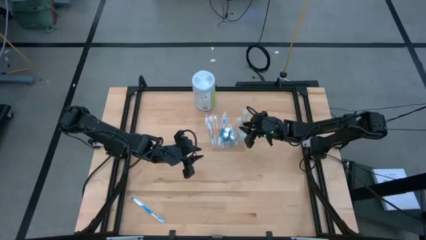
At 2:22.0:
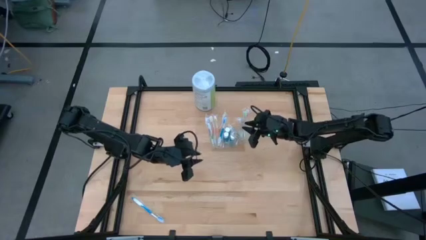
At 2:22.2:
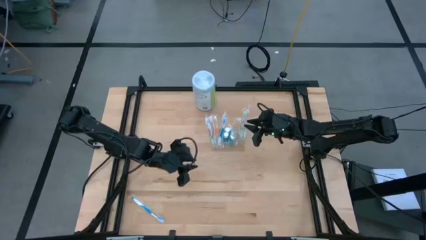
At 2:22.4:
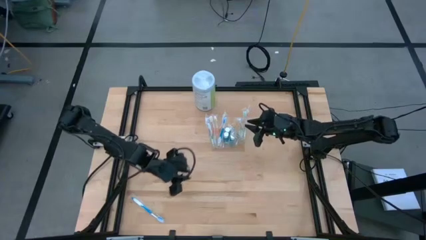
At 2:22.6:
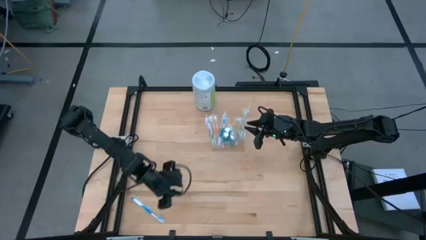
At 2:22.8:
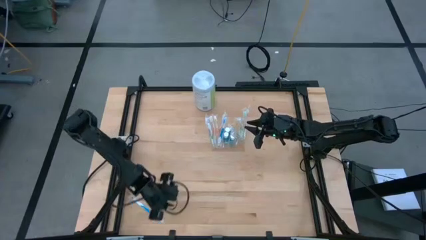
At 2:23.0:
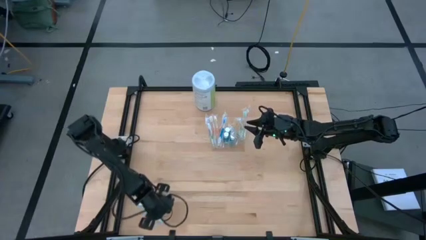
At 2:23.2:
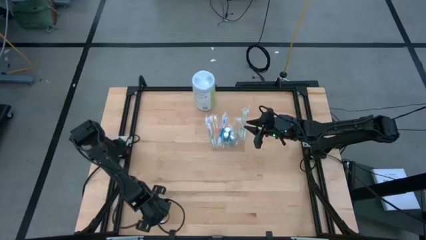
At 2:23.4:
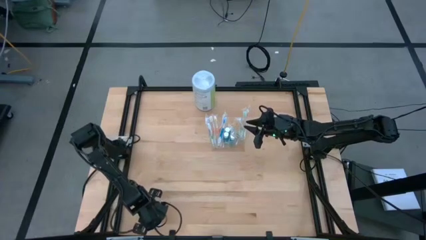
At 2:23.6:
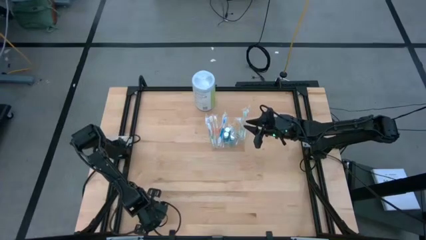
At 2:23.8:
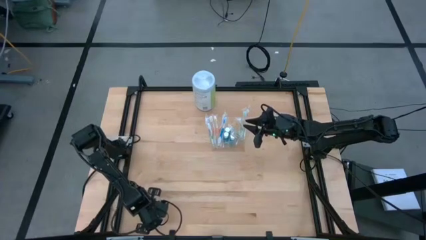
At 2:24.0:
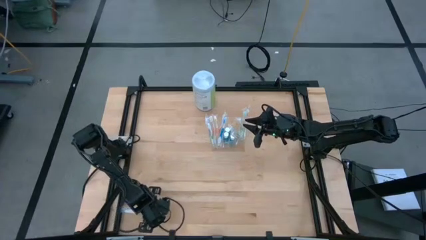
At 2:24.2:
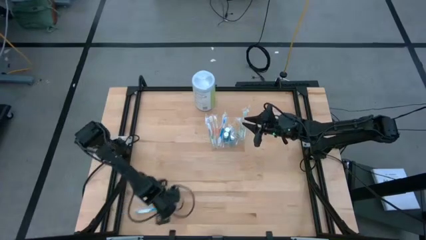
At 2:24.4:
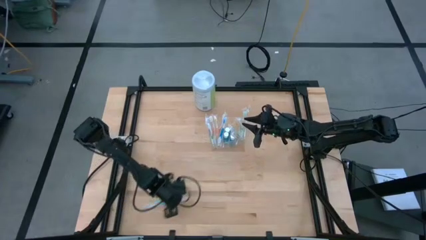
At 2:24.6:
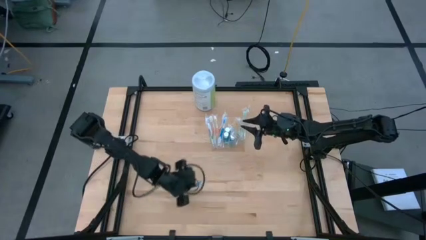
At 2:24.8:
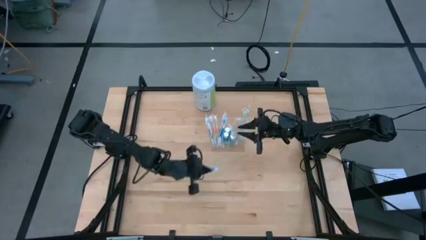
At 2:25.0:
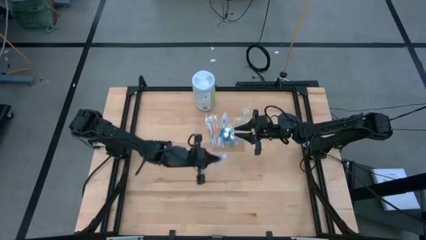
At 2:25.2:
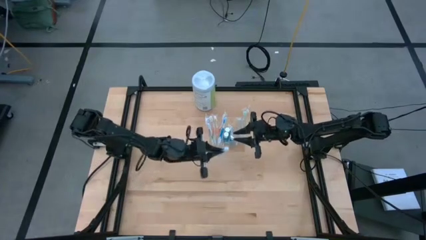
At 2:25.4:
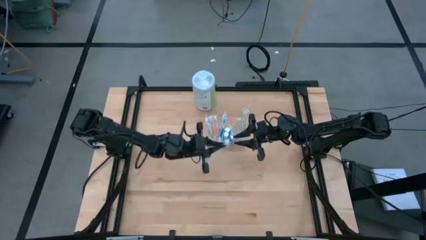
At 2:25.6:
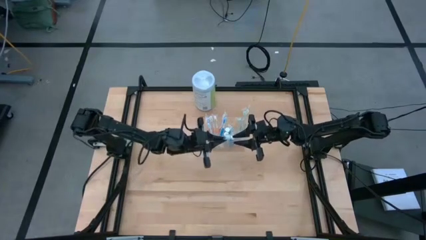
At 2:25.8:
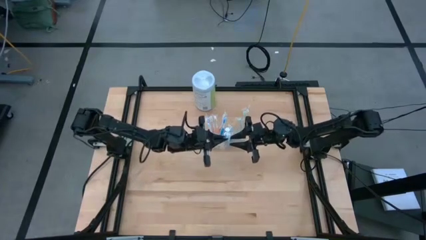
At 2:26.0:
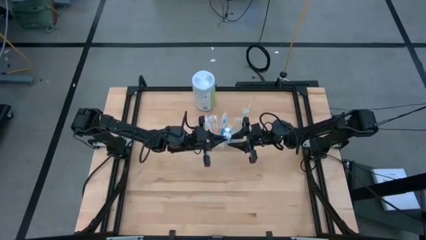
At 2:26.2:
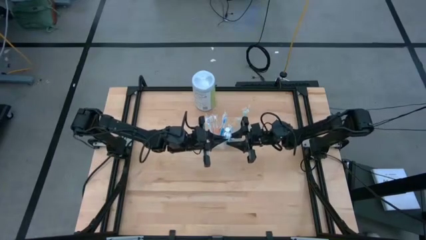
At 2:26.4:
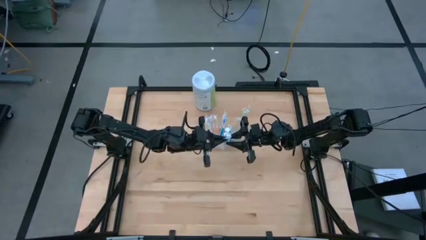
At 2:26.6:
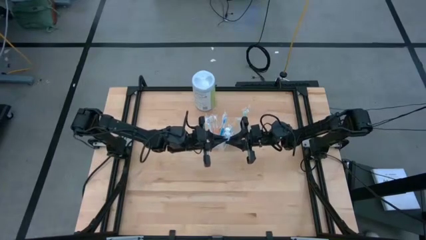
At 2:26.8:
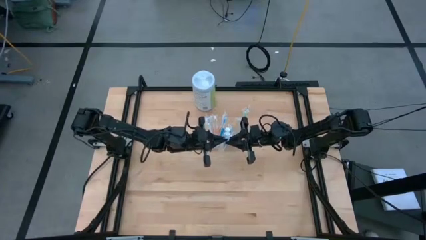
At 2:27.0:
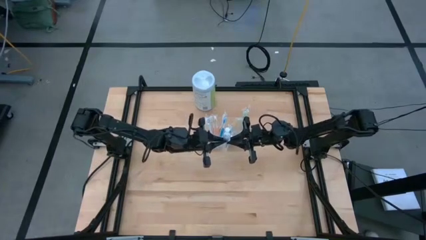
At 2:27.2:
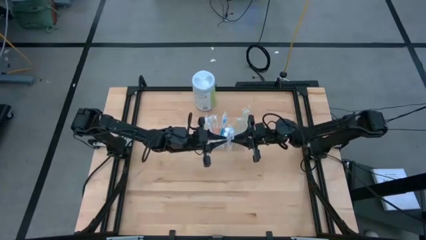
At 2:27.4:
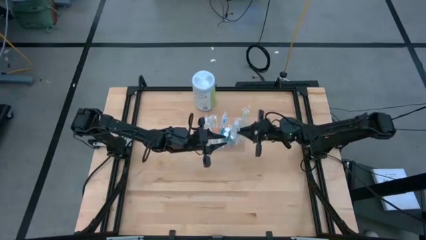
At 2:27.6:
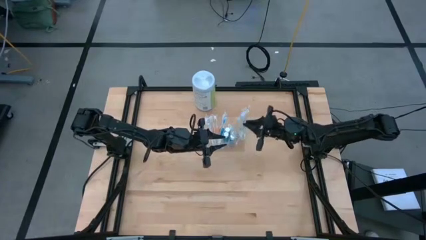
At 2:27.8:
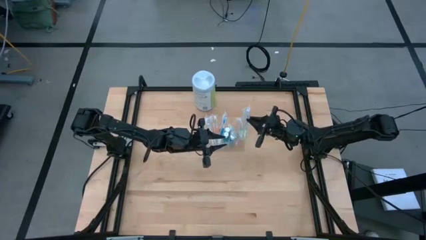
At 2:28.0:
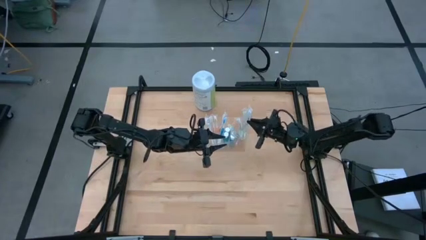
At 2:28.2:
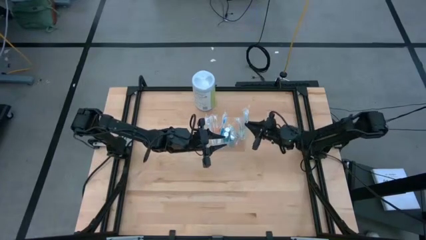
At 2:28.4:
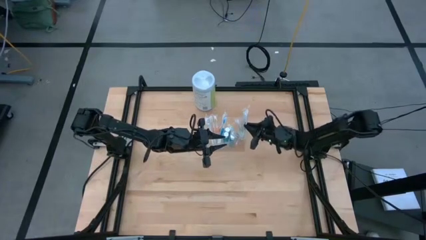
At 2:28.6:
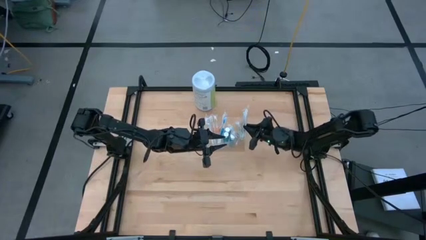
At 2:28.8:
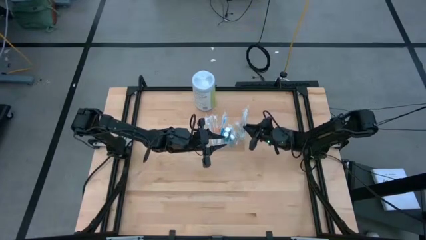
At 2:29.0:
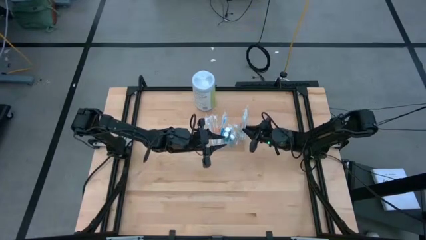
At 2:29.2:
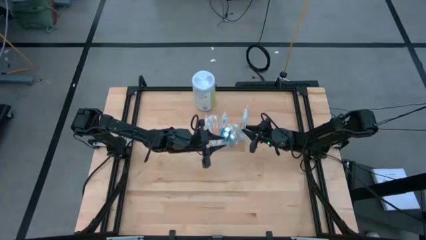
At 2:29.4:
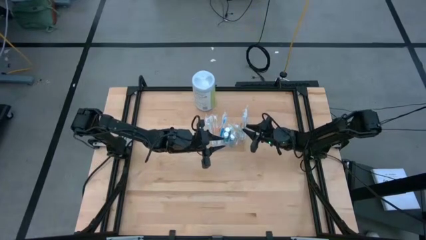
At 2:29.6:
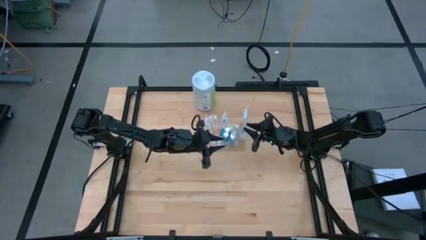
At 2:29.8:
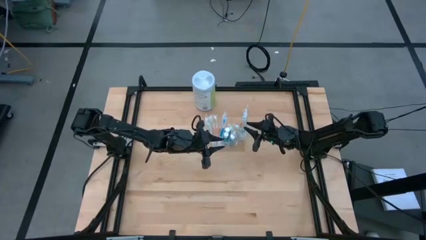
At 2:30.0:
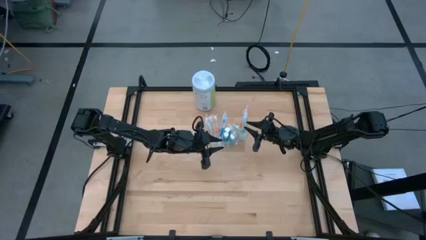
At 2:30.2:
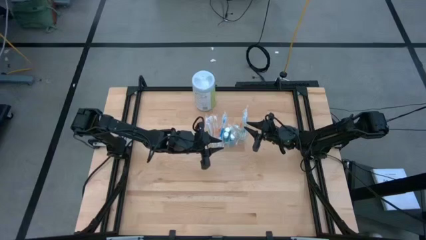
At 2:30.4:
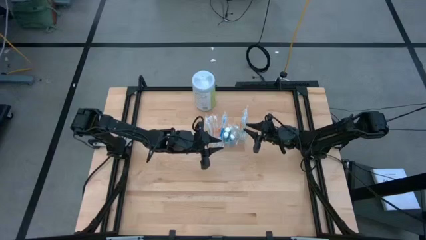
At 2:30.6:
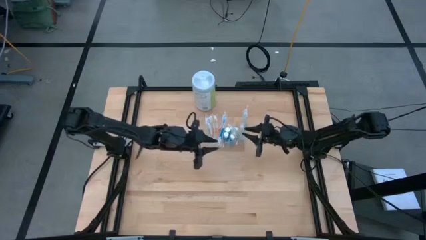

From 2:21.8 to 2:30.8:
Task: Pick & Place toothbrushing station
Put the blue toothbrush into the transparent organizer

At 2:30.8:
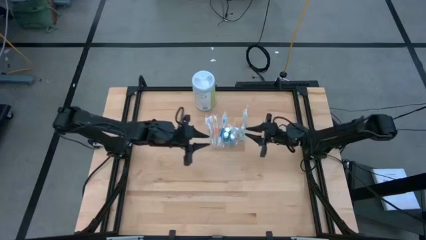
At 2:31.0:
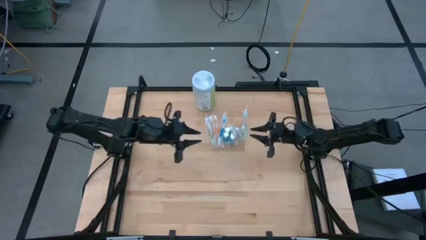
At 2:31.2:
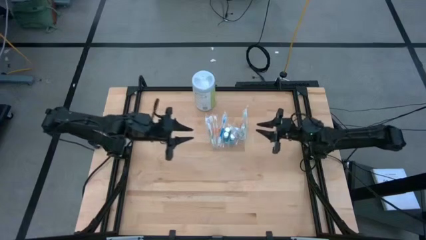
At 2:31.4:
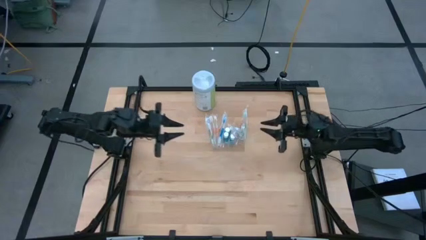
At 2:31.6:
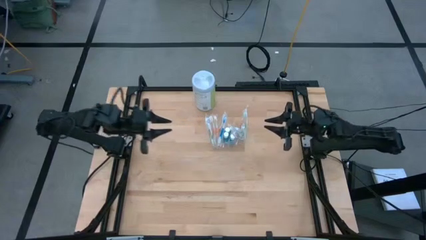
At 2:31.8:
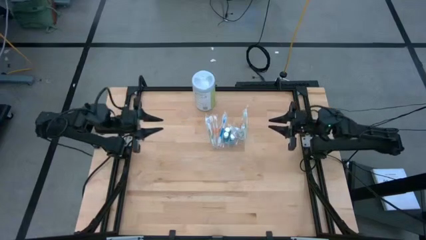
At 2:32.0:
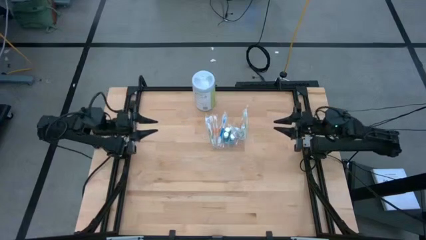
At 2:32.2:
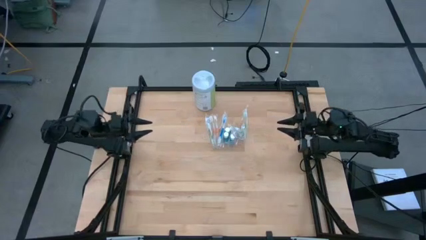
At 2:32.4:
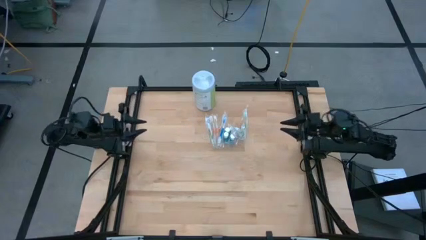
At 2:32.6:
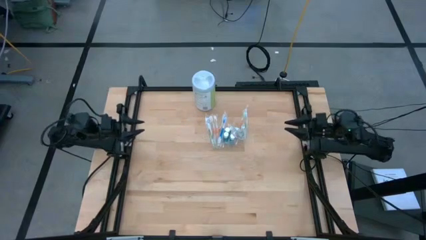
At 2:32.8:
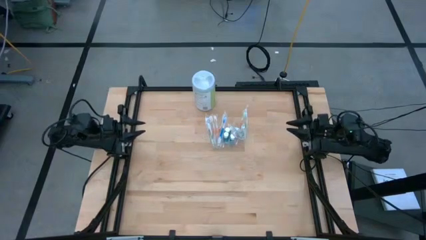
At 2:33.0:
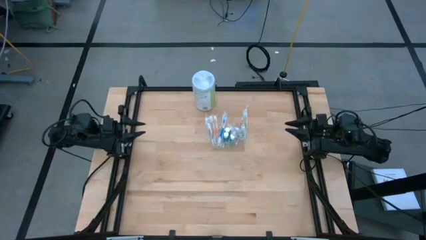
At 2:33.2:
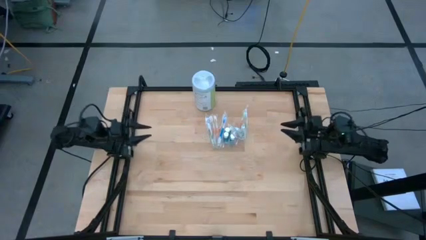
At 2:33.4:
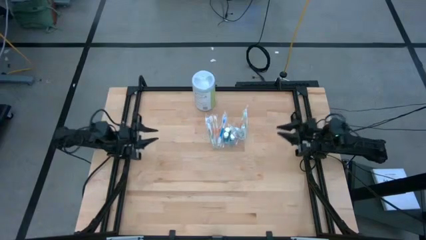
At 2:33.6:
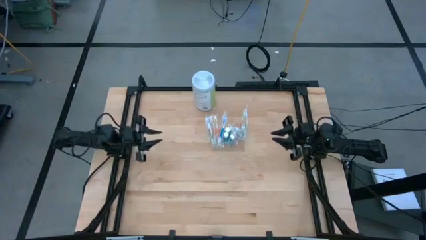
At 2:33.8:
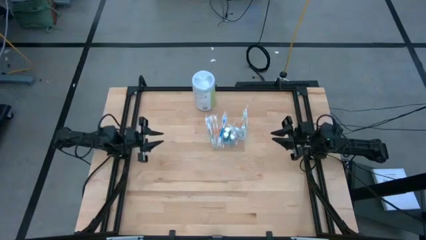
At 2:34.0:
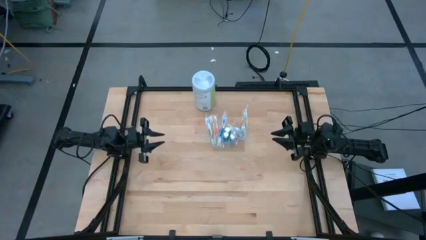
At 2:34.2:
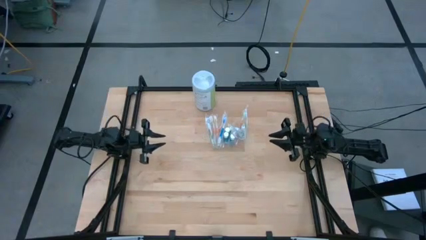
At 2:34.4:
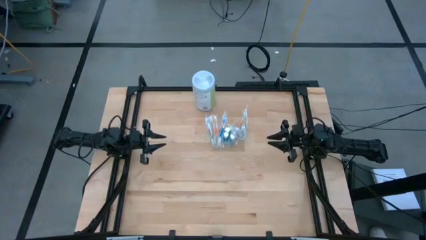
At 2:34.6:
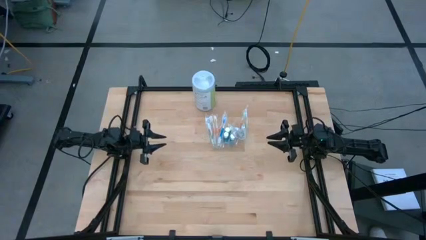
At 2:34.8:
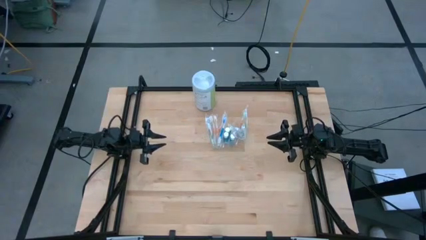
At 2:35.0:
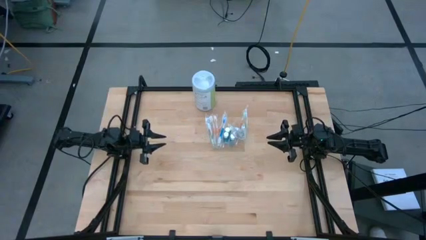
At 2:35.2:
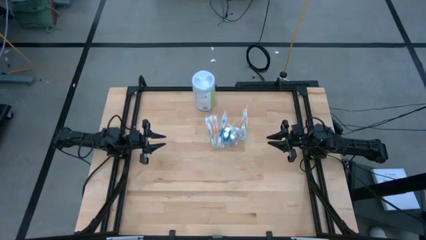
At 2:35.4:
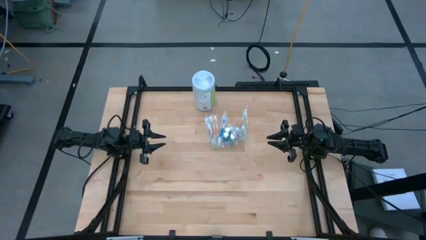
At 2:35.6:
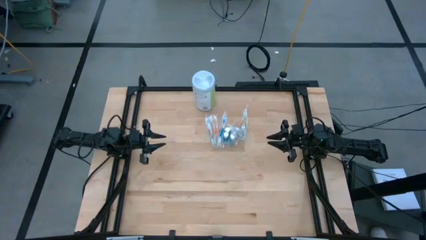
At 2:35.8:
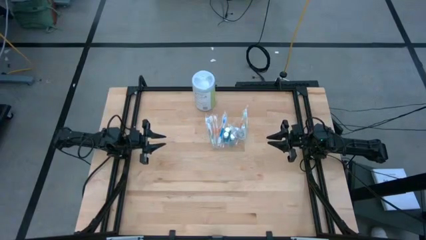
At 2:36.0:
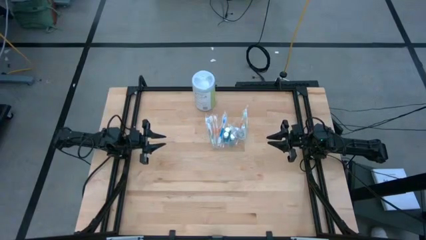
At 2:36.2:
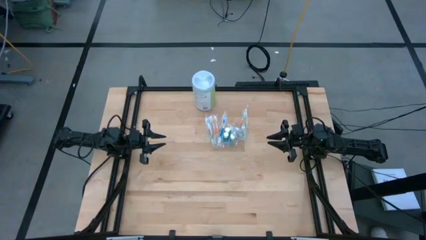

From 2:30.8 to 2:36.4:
Return to Home Position

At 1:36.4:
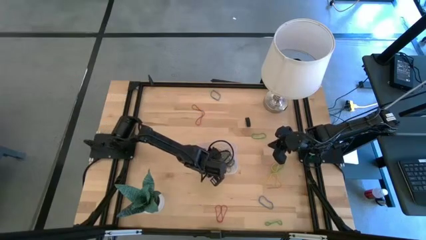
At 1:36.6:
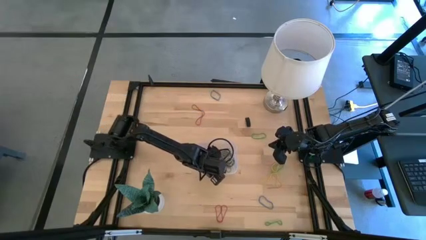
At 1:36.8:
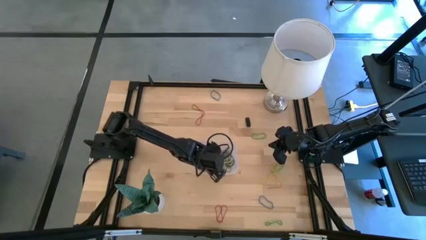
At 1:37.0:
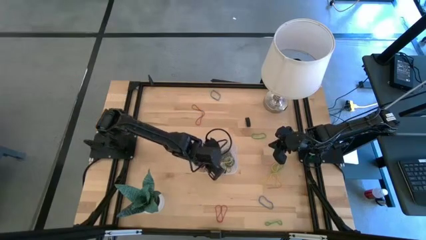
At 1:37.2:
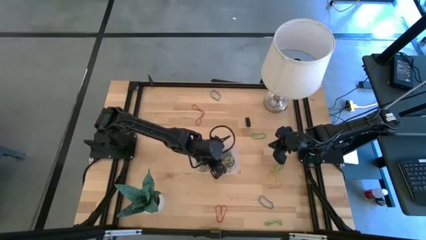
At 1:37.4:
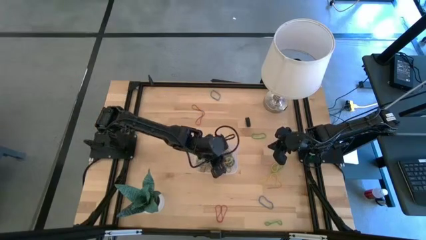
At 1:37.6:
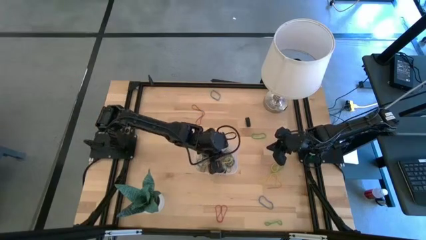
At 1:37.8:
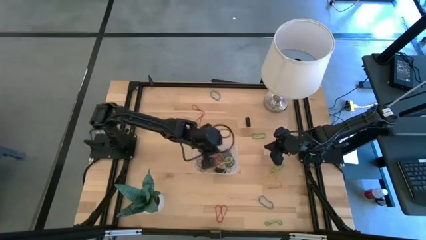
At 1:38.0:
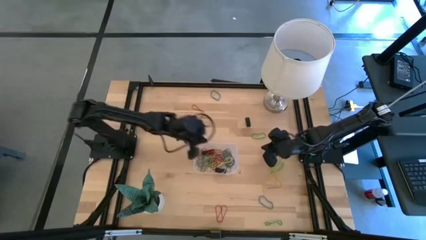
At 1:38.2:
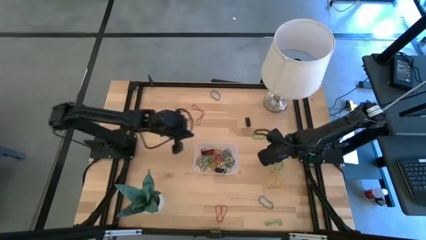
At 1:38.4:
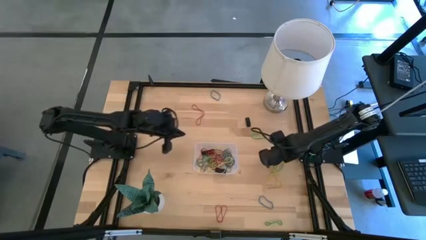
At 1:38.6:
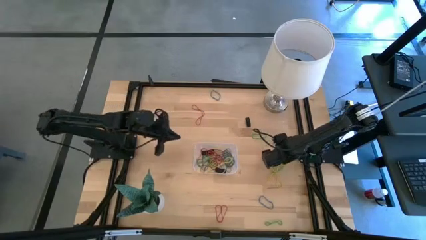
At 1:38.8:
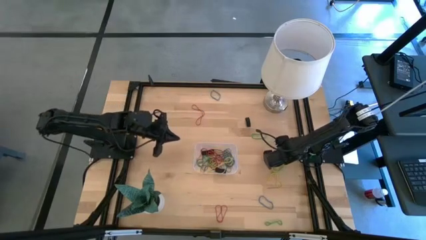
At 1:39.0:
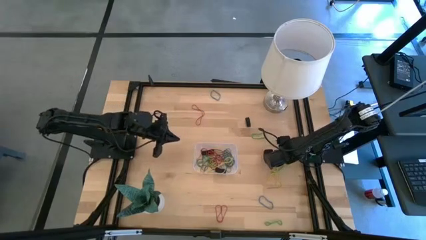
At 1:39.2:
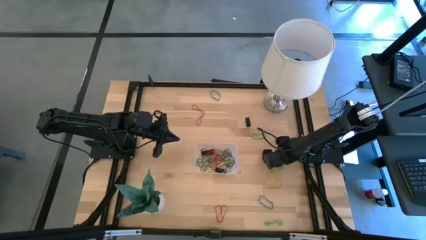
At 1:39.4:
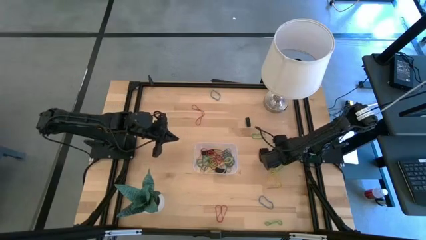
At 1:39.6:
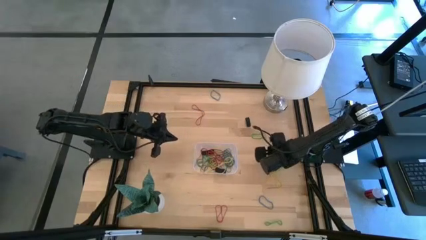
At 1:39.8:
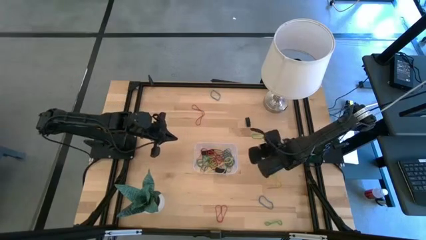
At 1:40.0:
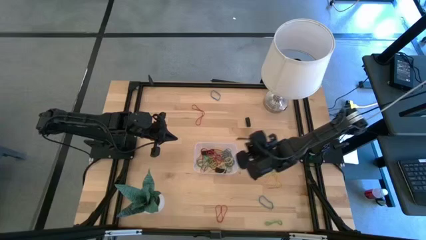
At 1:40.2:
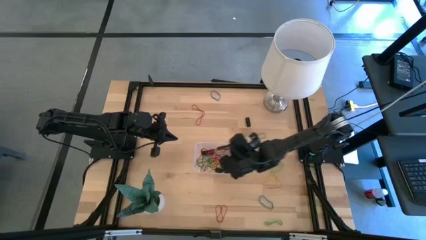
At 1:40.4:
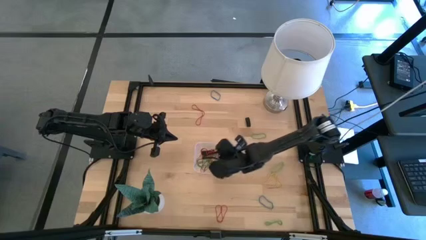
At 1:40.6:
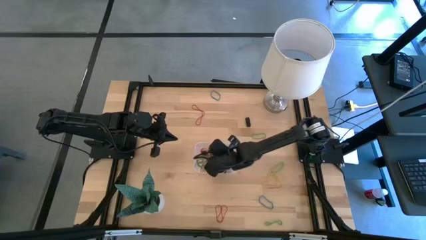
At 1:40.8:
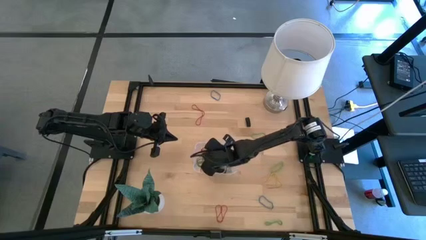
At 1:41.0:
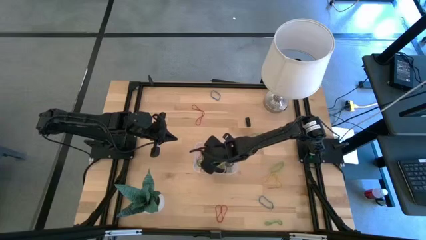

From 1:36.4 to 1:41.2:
Task: Pick and place rubber bands into bin
Put the yellow rubber band into the transparent bin
